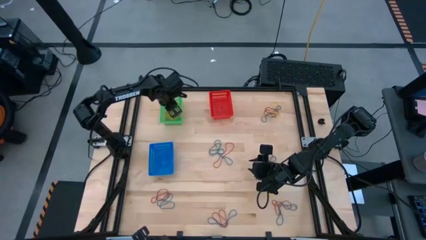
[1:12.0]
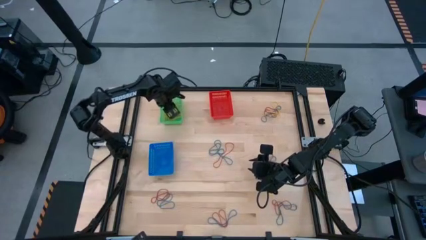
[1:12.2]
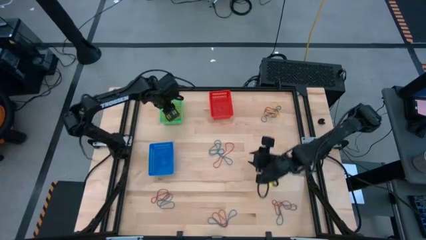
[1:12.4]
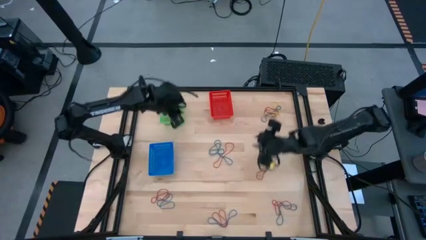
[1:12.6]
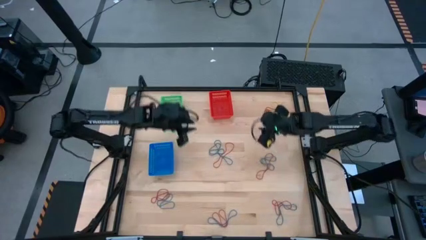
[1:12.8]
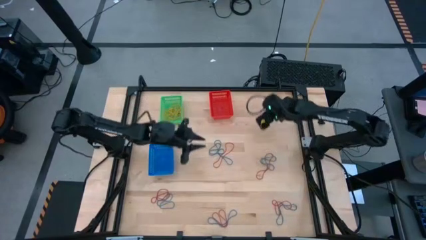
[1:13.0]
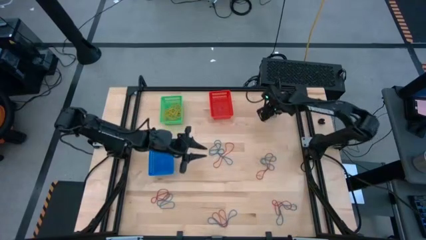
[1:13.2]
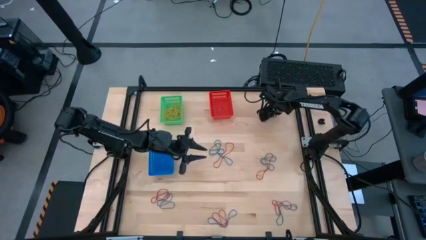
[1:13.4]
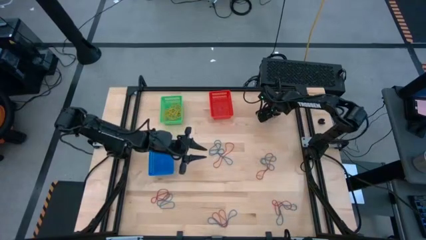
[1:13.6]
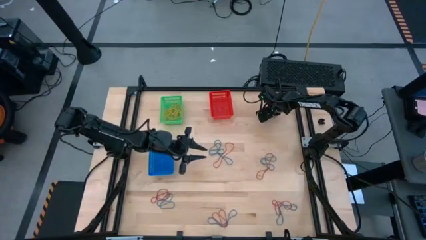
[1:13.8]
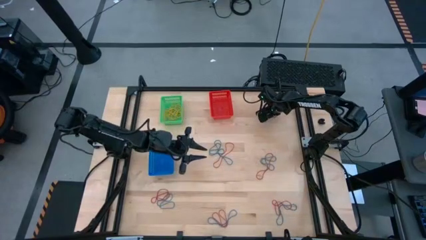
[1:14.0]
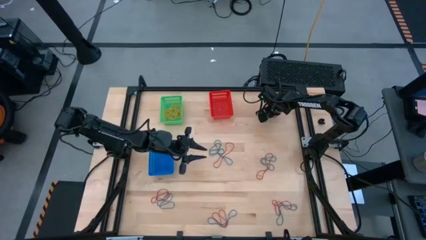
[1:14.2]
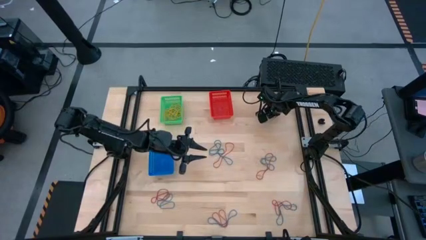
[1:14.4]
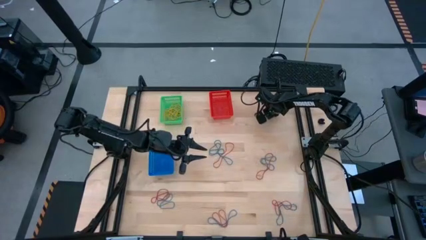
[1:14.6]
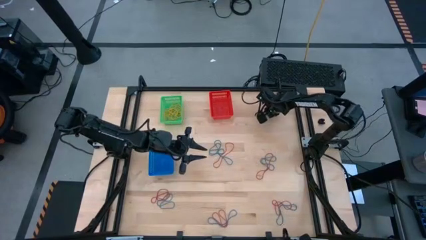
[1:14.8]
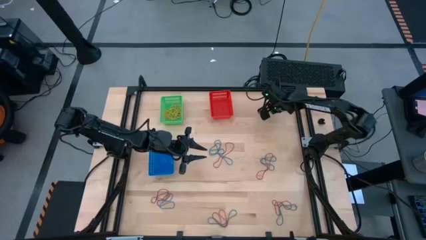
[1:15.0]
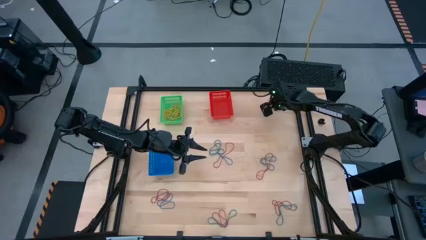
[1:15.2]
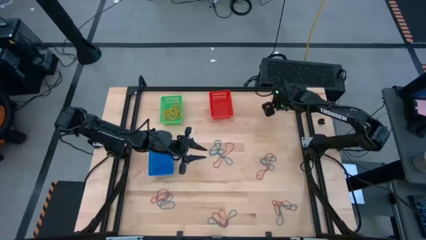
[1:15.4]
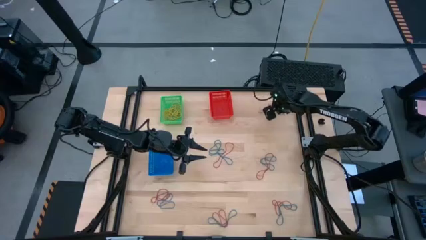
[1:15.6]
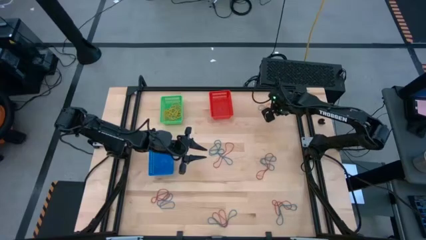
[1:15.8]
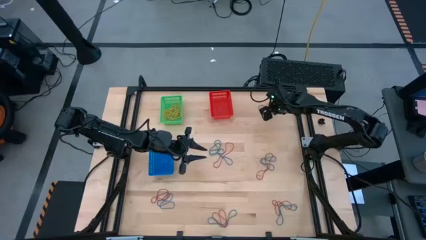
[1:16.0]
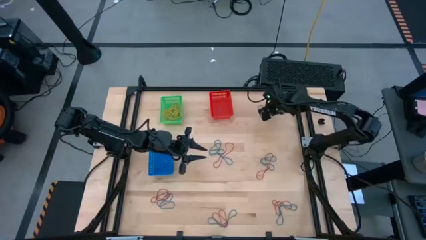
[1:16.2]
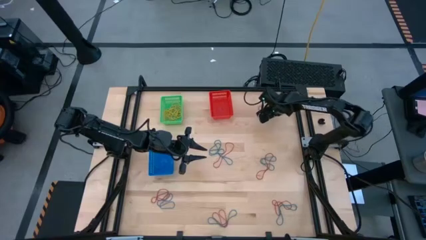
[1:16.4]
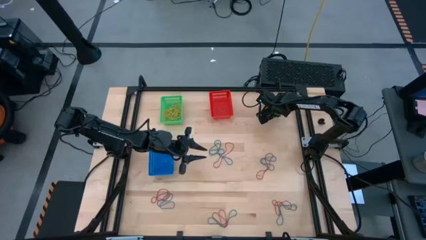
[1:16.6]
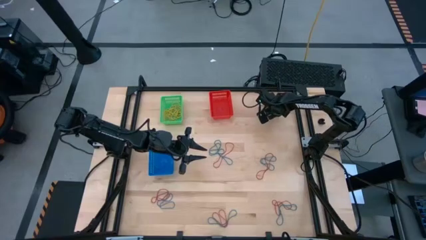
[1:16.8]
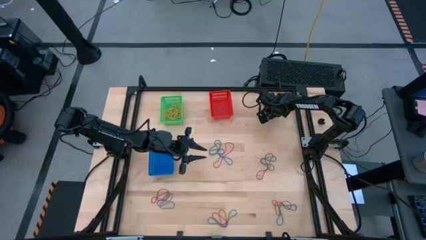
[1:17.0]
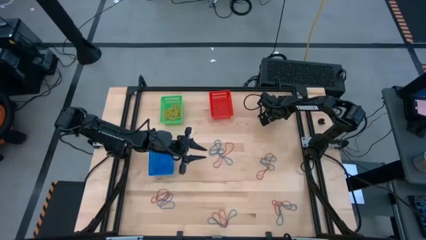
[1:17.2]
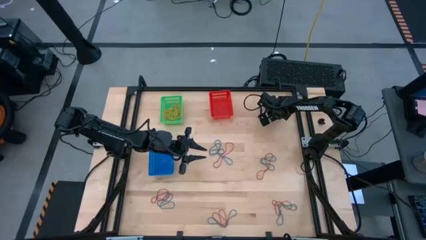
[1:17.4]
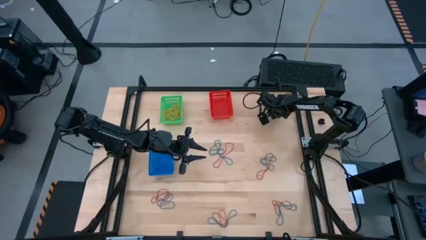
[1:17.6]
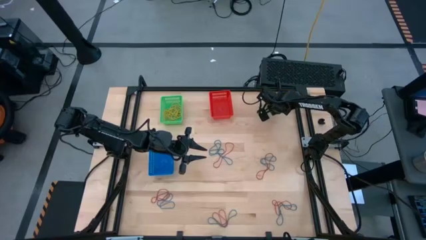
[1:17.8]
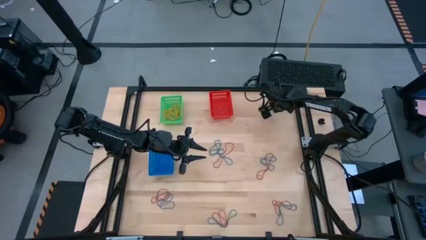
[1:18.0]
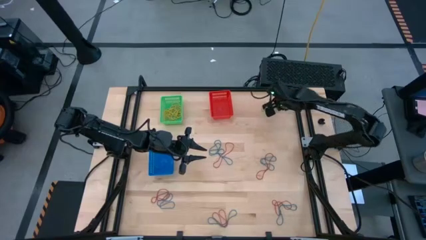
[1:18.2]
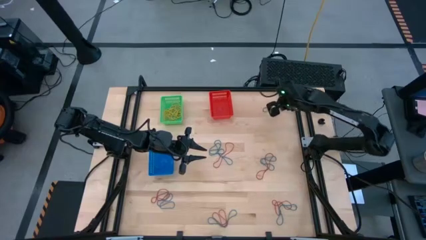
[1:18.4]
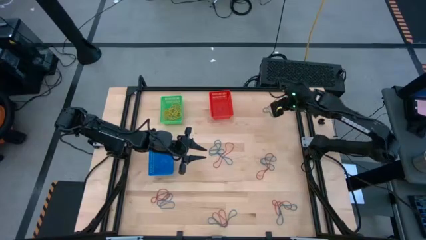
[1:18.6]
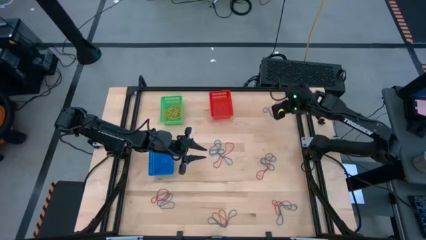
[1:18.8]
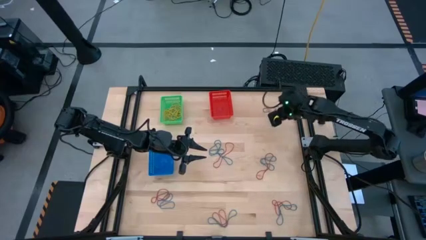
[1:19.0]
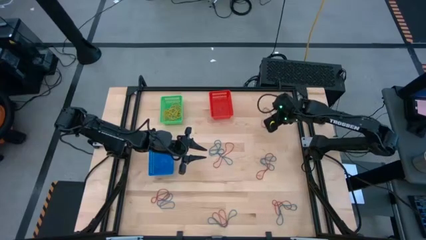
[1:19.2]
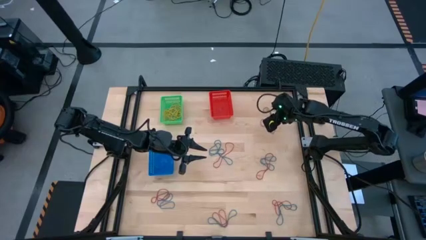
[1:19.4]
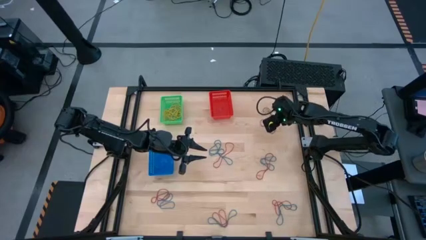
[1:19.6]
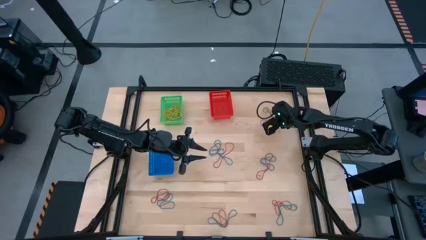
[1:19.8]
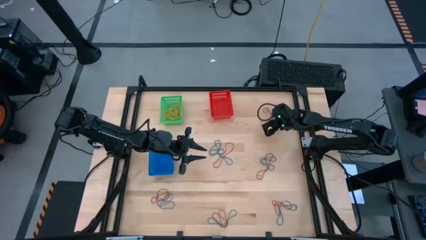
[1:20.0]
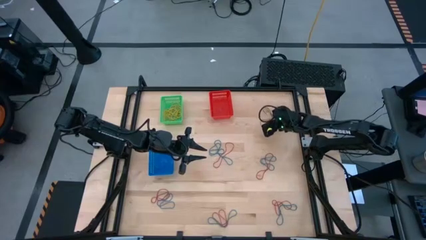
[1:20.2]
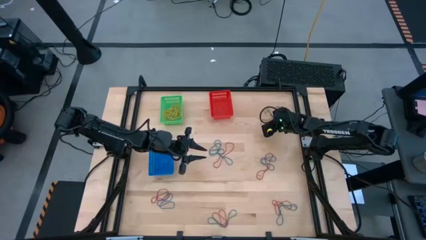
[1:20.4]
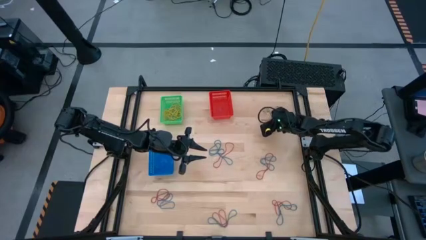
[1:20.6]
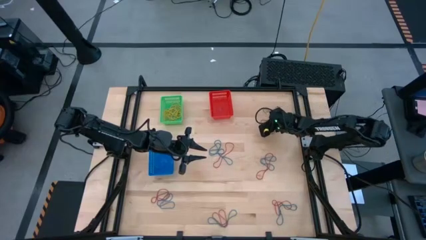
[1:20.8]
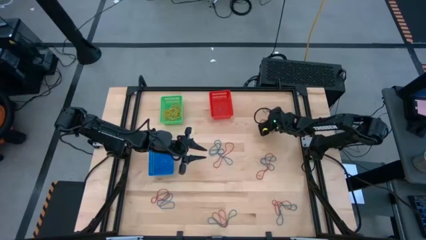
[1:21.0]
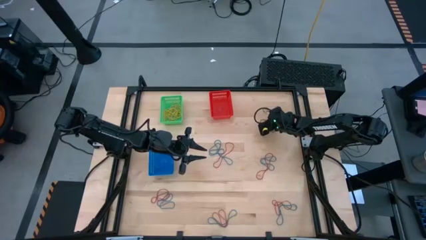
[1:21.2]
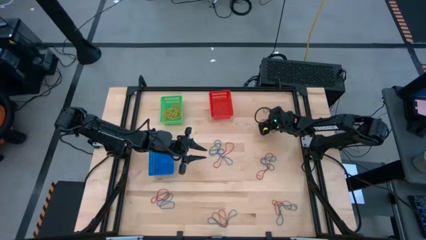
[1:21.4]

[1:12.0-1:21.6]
Task: Sort rubber bands into baskets
Put the yellow rubber band into the green bin

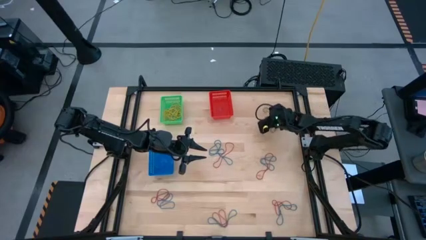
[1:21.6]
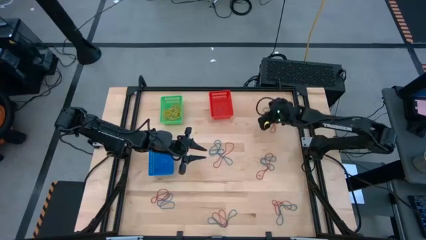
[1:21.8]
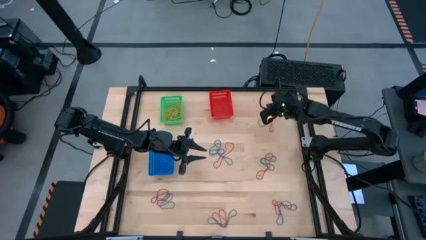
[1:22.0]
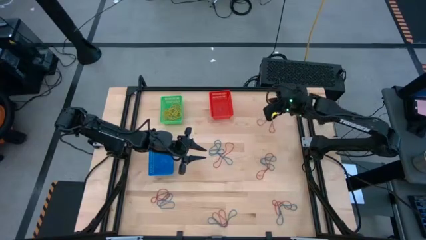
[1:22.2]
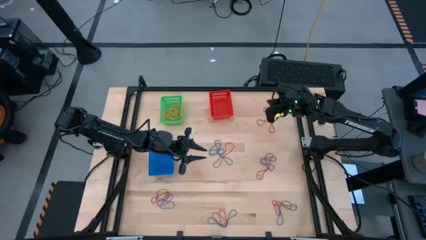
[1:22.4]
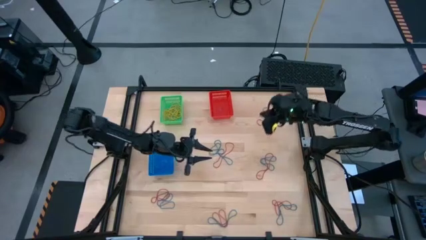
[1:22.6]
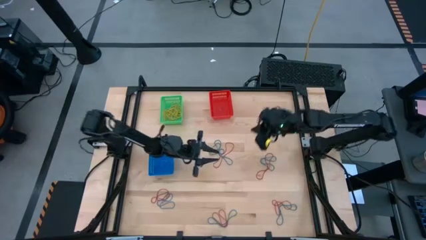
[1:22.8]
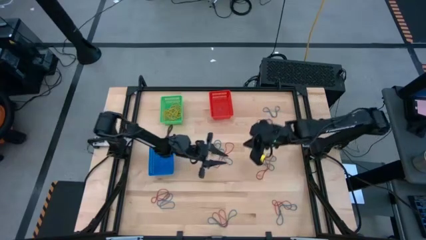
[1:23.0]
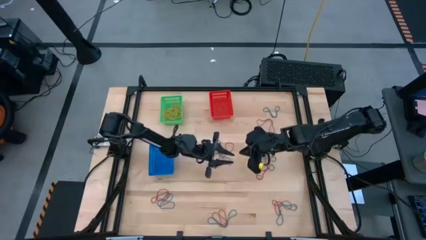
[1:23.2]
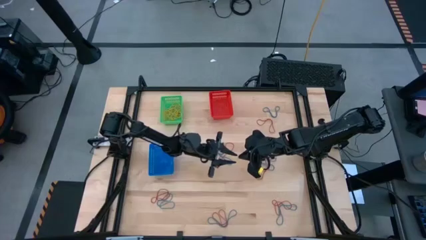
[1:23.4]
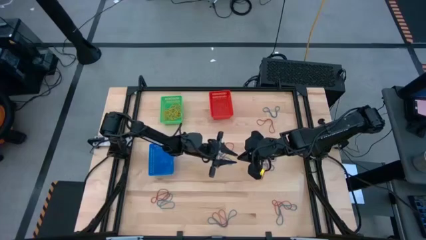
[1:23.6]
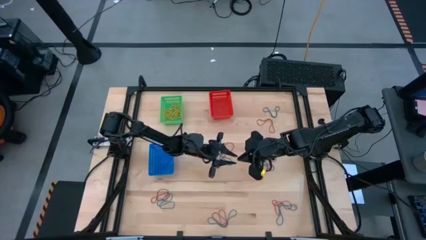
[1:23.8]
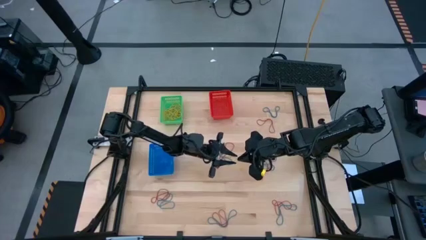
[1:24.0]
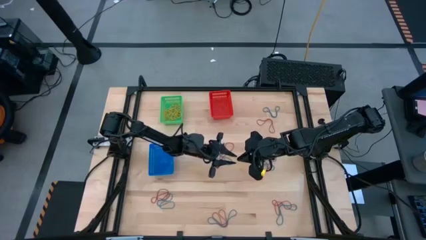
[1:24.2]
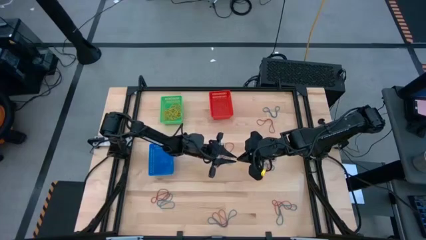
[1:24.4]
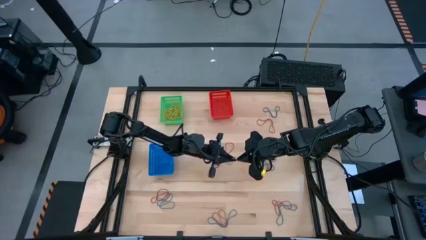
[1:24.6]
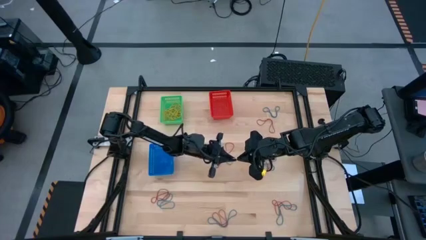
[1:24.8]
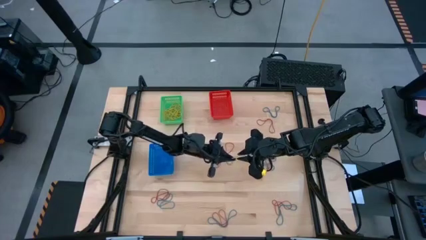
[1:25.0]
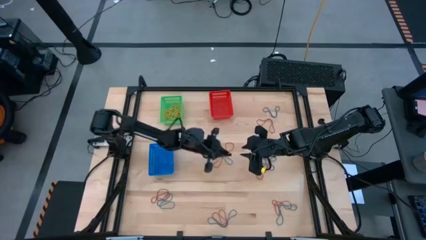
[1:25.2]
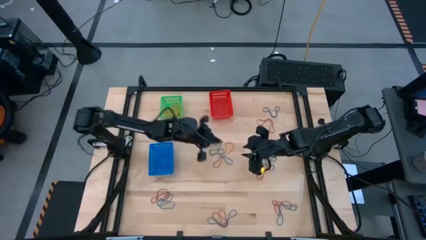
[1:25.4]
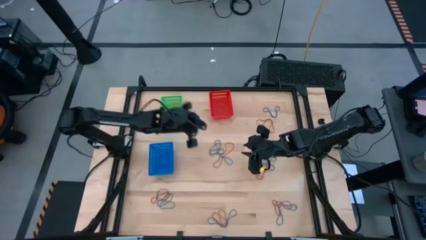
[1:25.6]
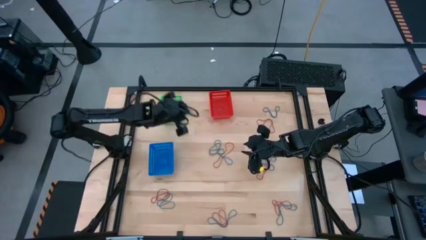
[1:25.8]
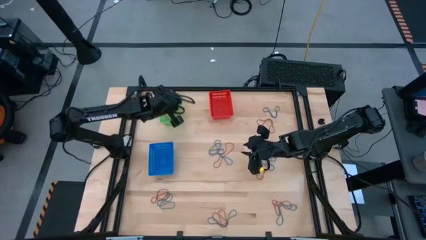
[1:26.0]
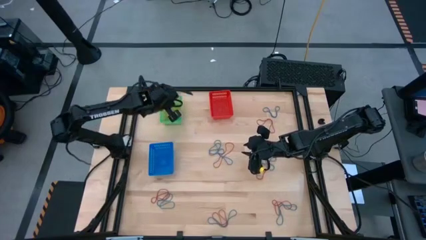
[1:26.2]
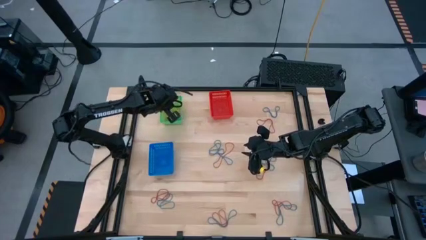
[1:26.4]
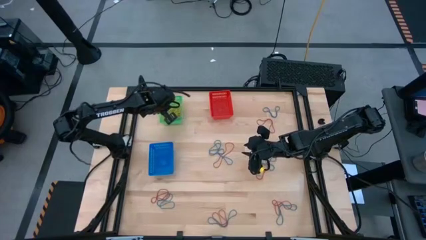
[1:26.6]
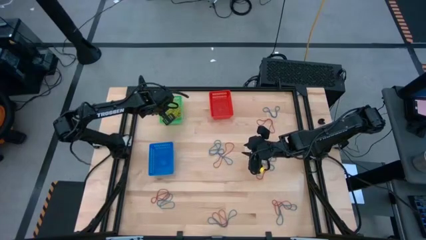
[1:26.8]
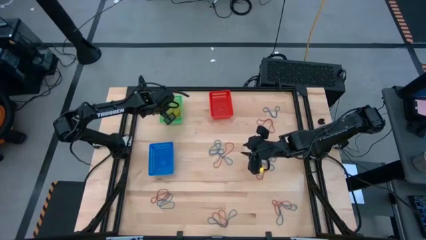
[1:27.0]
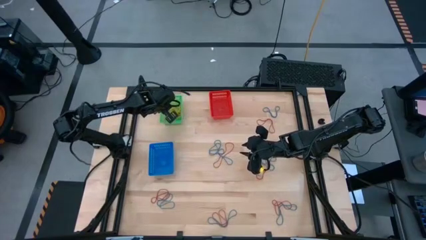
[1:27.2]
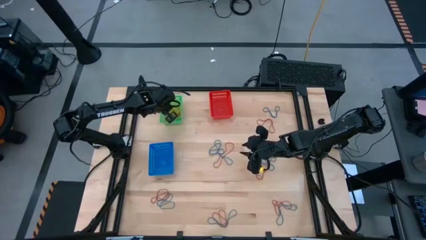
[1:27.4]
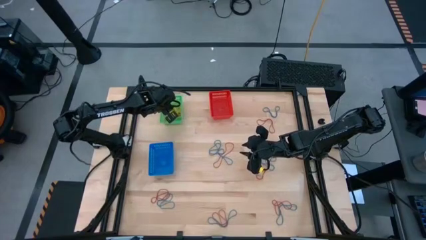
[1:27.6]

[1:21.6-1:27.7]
Put the yellow rubber band into the green bin

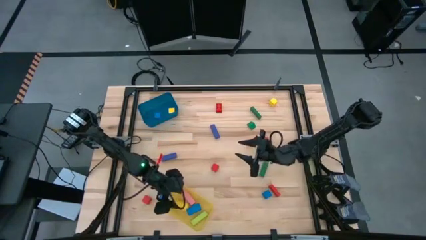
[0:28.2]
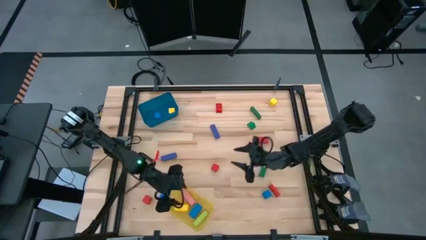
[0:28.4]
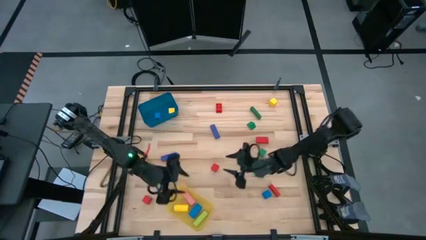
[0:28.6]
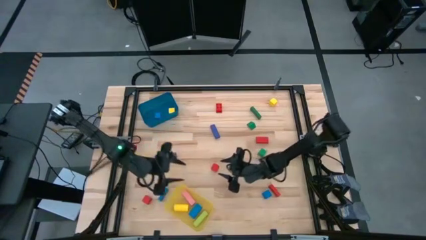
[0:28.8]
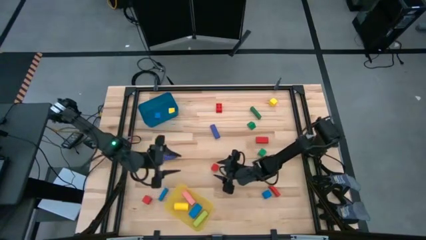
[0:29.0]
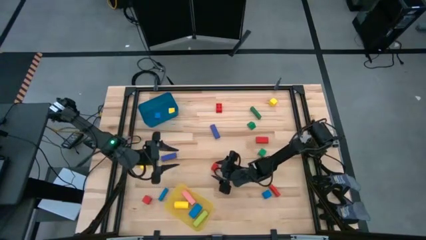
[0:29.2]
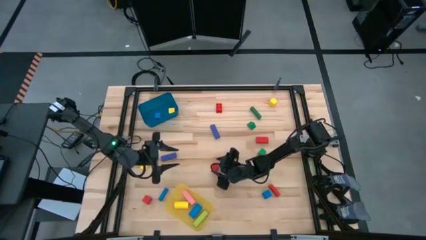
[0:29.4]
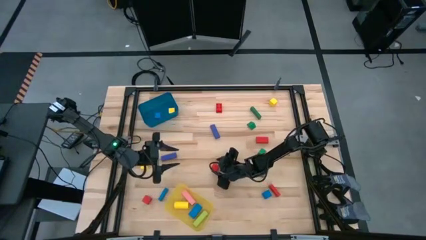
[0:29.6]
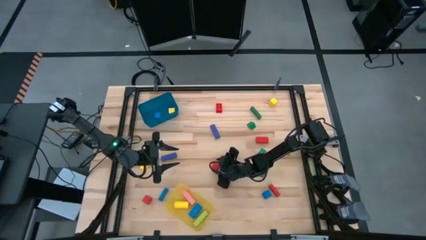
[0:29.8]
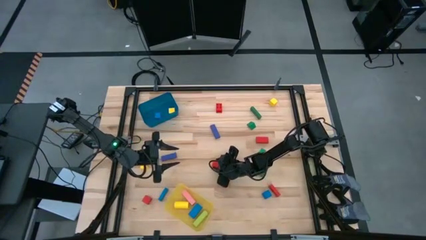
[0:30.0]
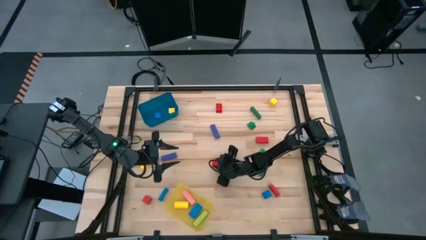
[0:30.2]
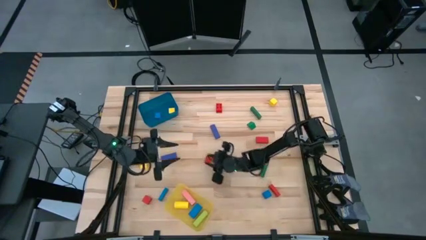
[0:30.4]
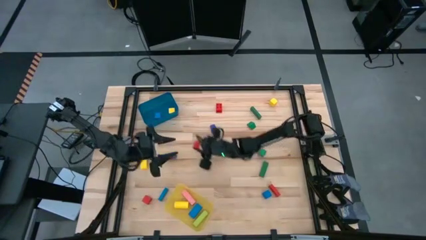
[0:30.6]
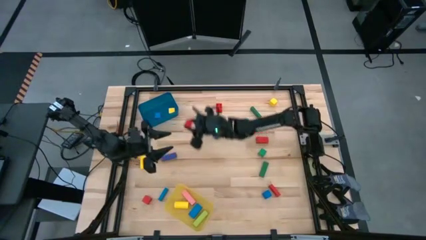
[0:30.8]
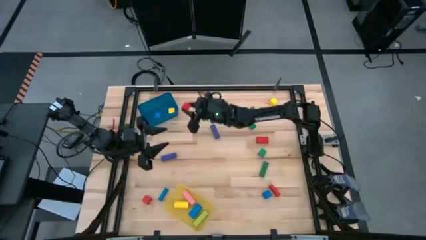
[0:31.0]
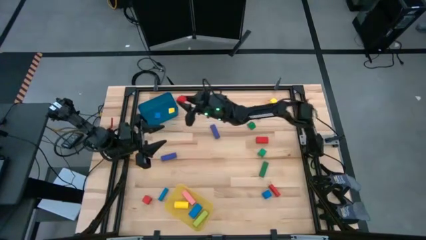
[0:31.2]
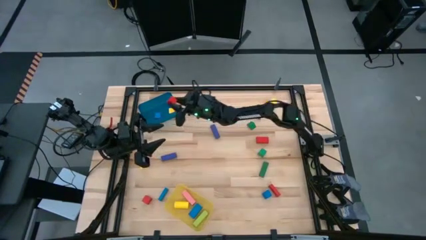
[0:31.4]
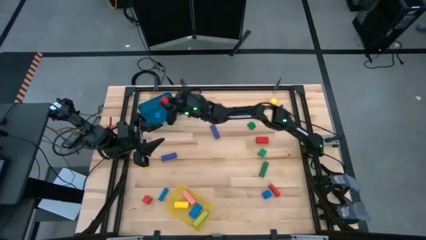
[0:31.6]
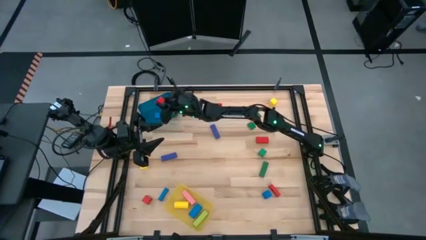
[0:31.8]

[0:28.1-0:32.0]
Task: Sort blocks by size
Put the top small red block into the blue bin
